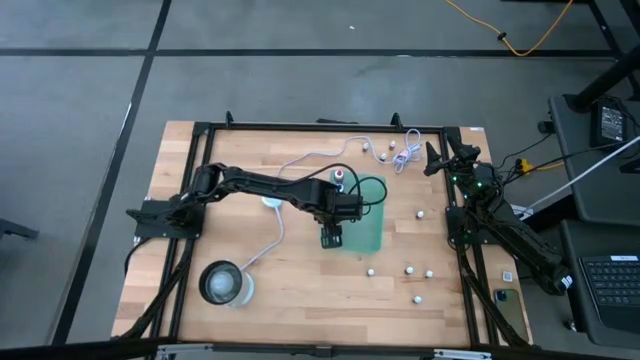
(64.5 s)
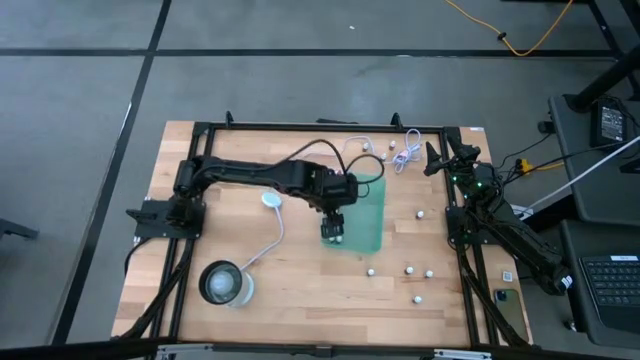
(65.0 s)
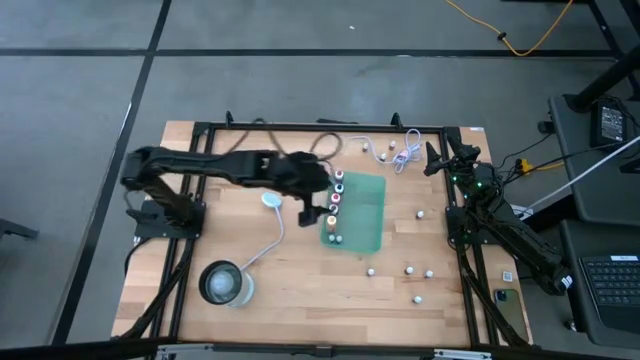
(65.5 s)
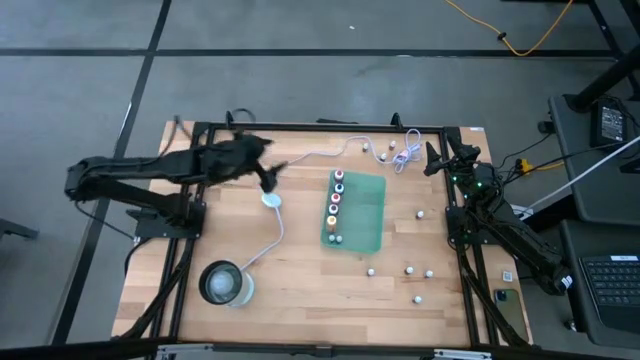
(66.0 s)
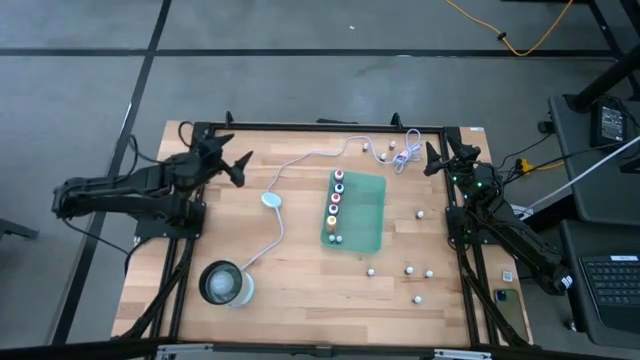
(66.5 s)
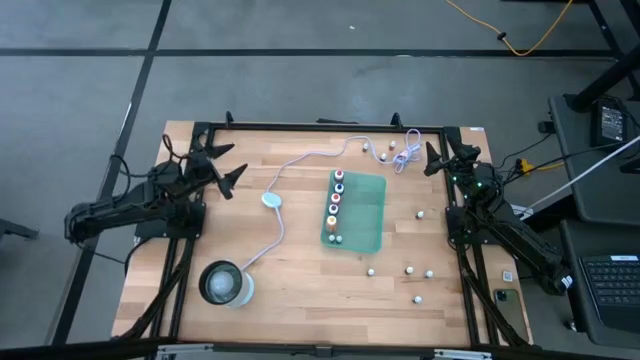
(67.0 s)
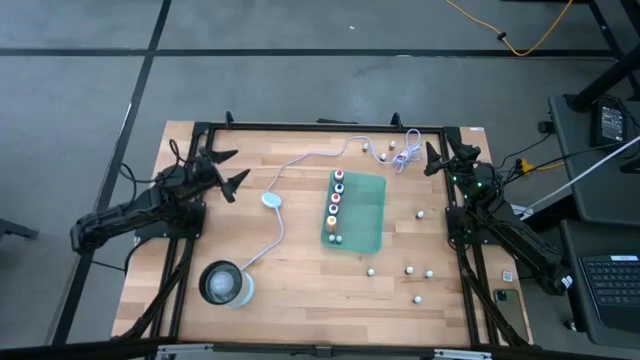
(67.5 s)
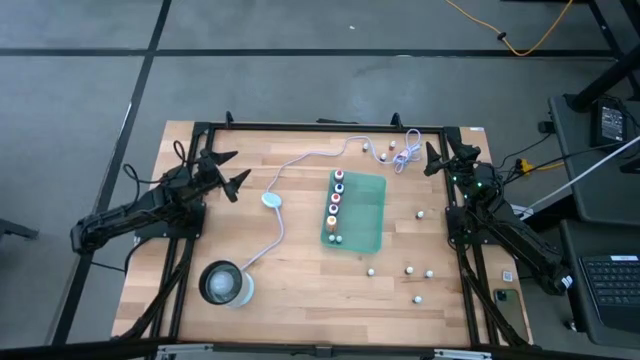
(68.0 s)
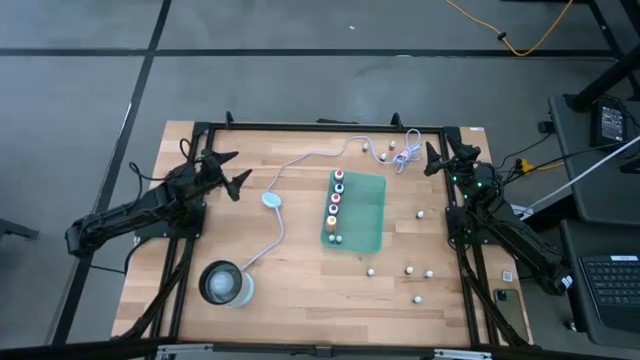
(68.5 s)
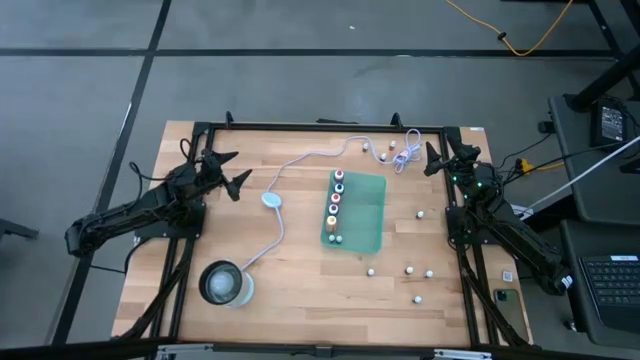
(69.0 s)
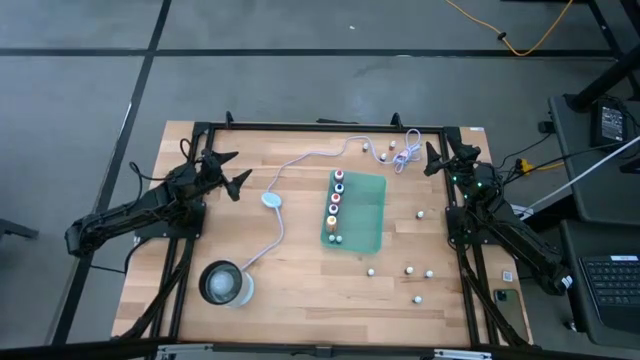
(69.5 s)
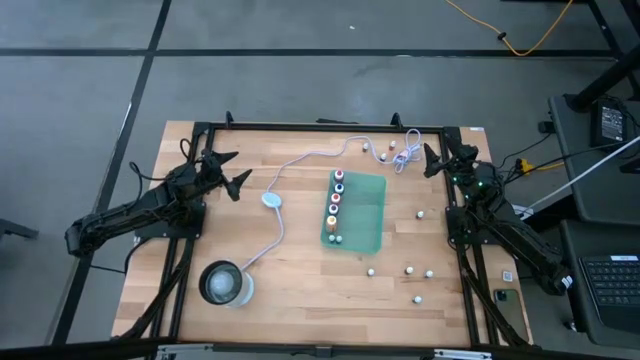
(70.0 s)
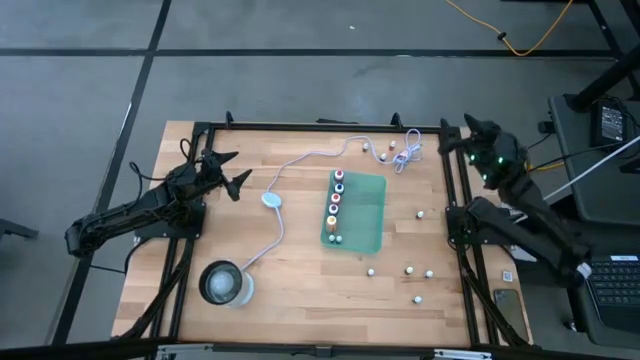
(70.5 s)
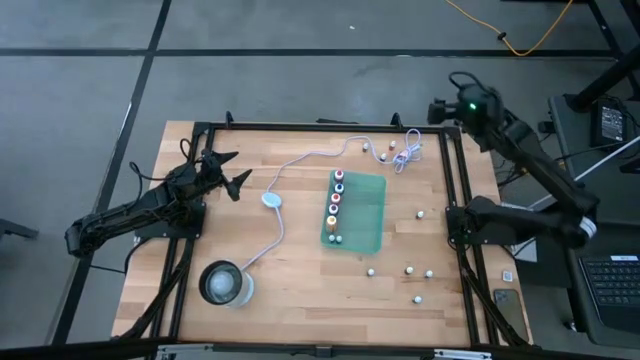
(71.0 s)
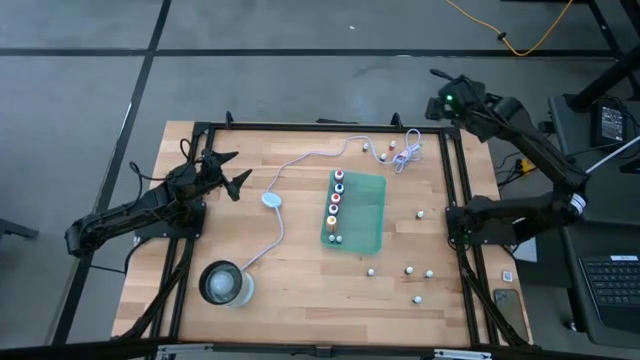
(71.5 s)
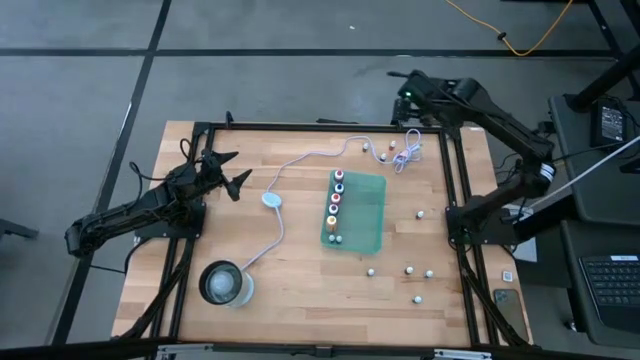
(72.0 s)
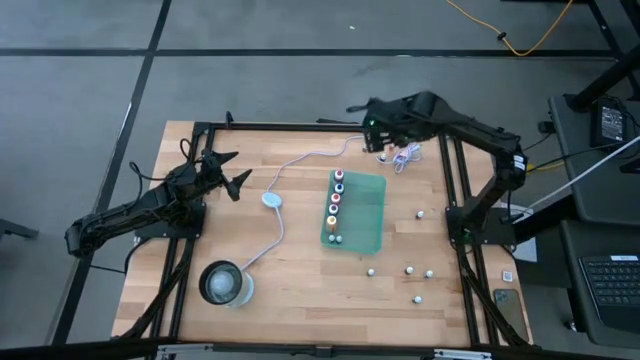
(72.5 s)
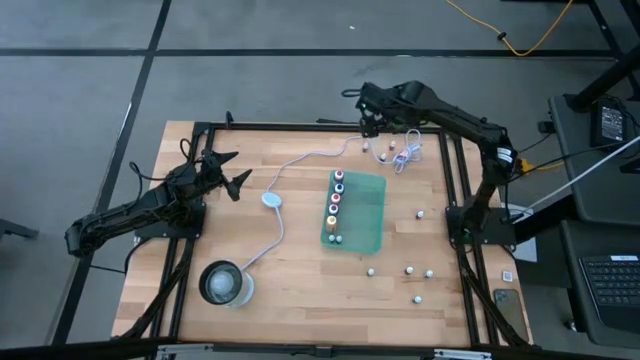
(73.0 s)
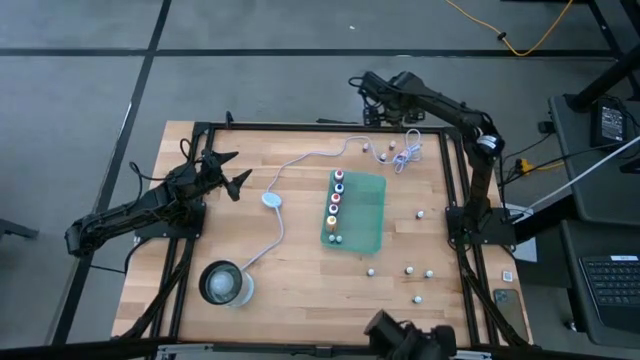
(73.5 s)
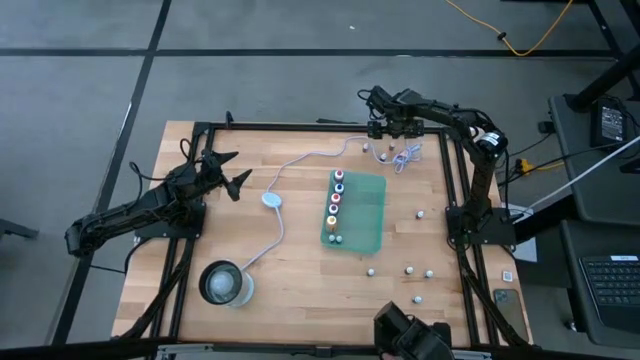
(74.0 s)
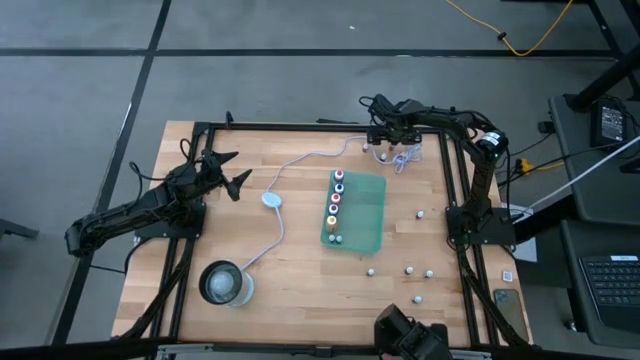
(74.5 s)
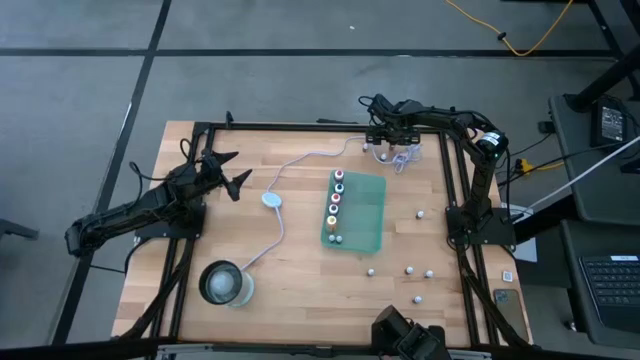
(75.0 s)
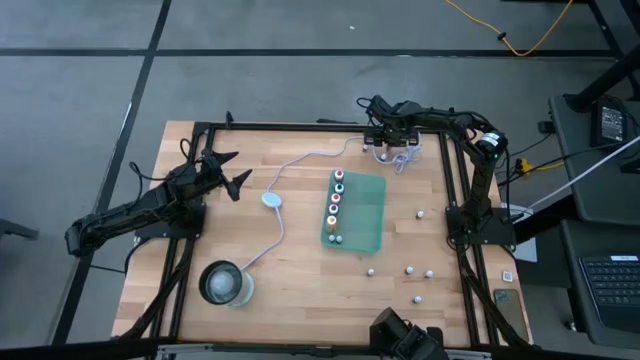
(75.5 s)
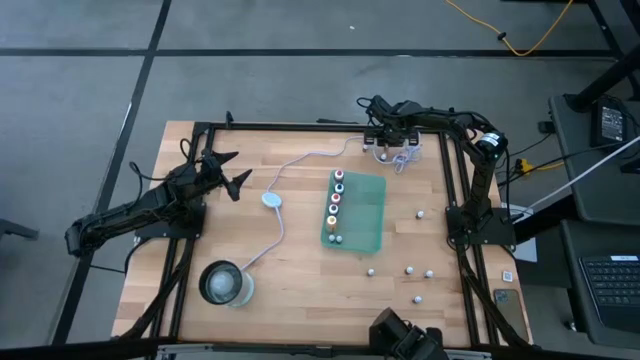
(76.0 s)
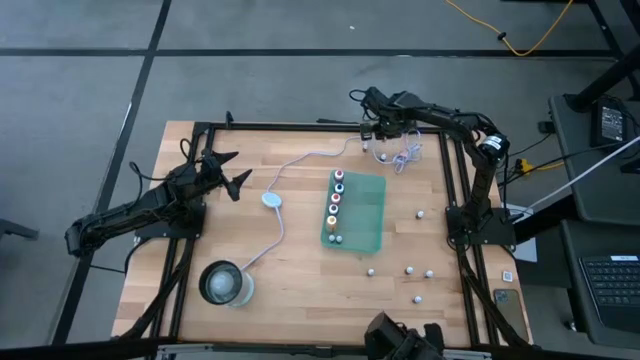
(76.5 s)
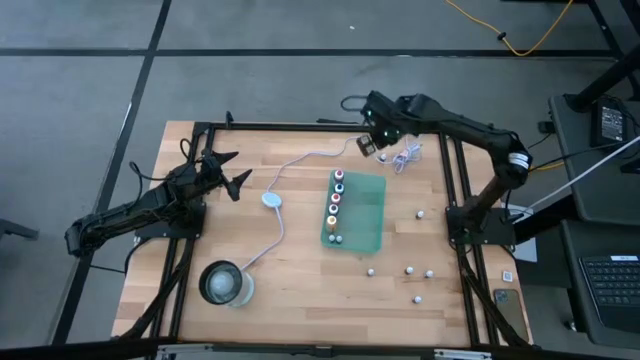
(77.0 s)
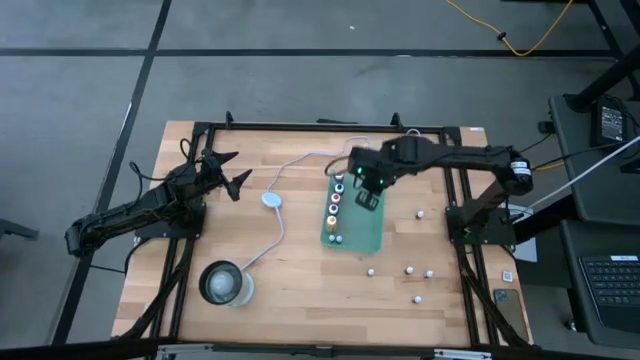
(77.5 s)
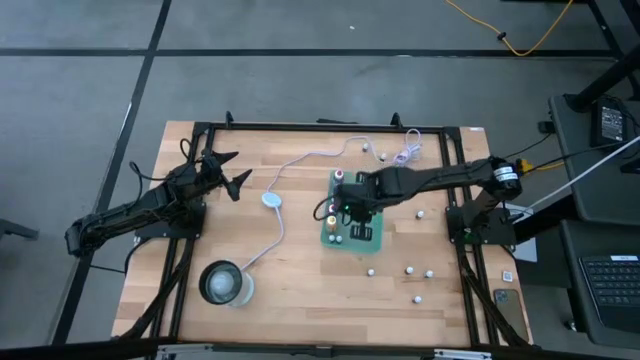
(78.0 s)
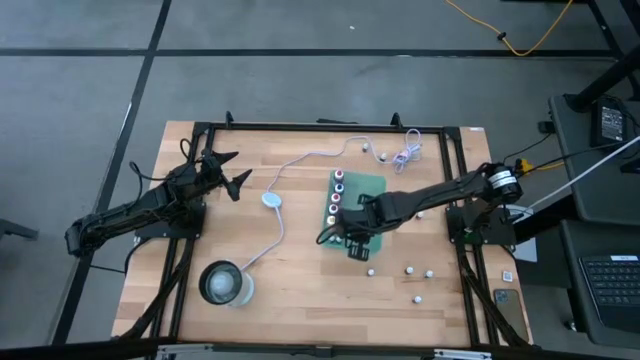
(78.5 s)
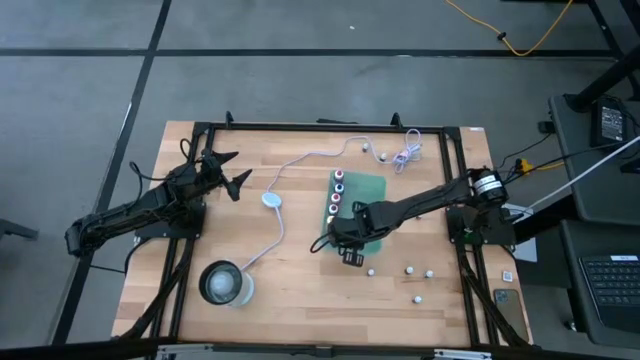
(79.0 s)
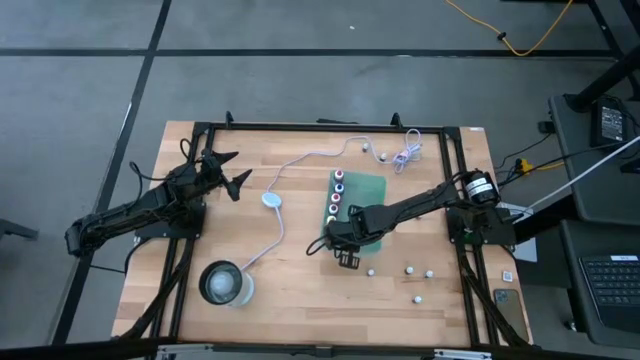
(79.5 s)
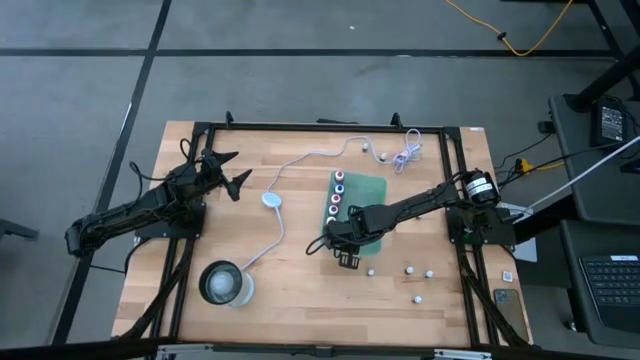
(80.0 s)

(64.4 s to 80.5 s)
Task: Pick & Place food coloring
Put the small red food coloring bottle into the green bin

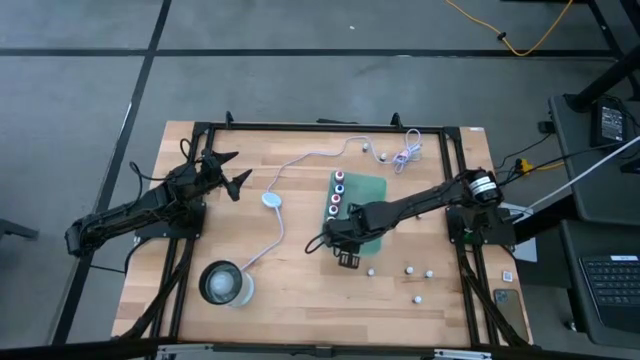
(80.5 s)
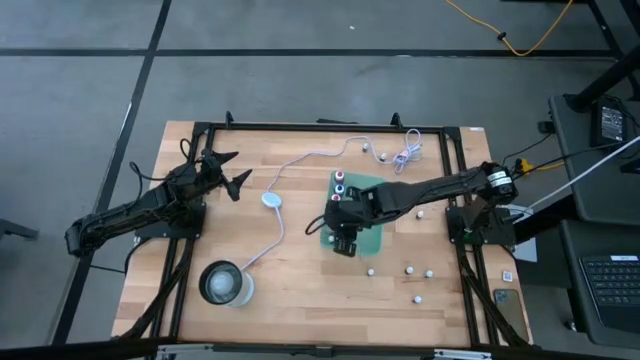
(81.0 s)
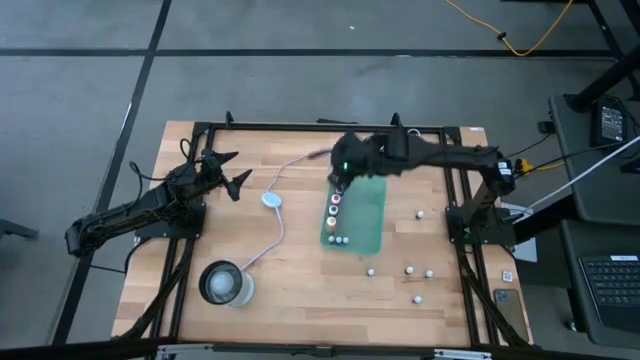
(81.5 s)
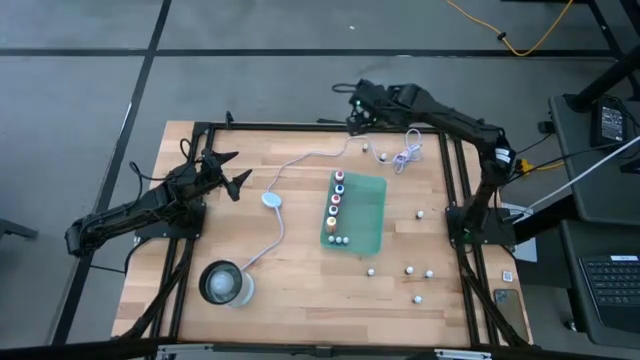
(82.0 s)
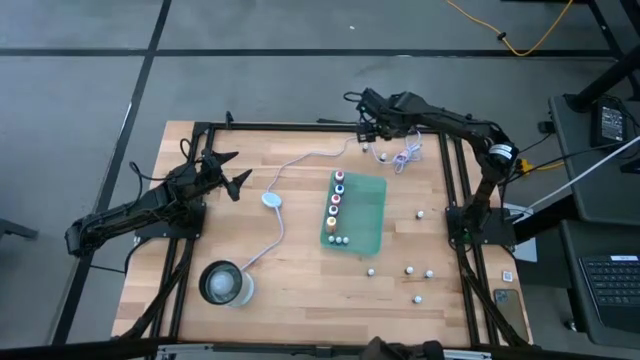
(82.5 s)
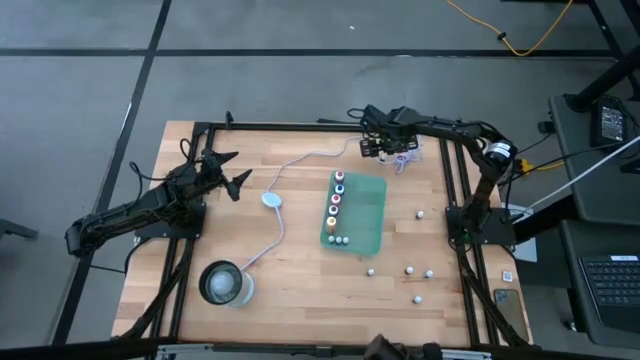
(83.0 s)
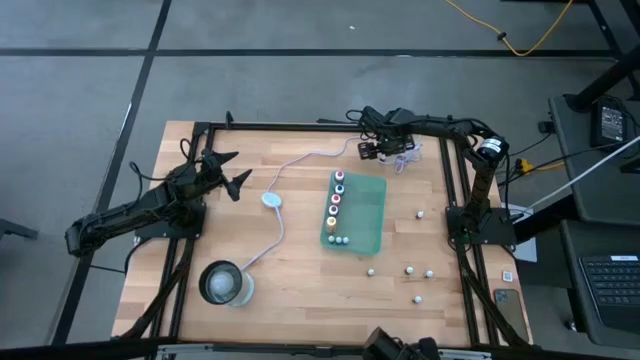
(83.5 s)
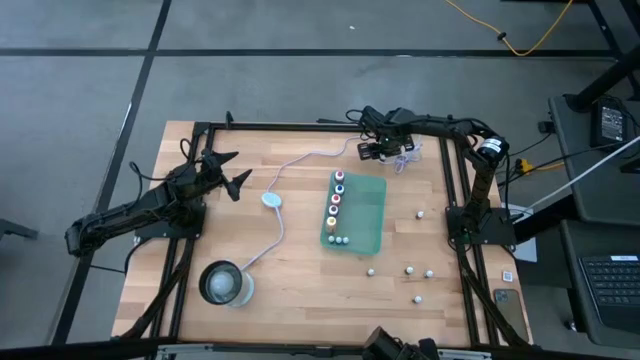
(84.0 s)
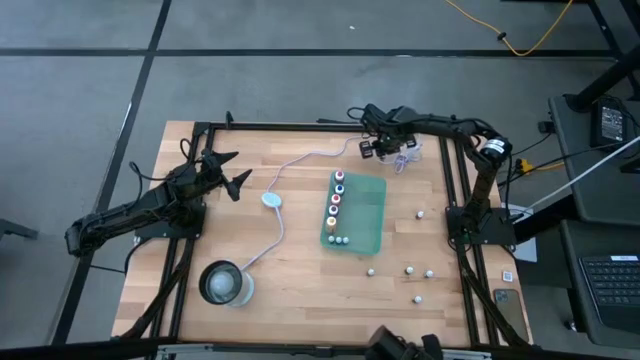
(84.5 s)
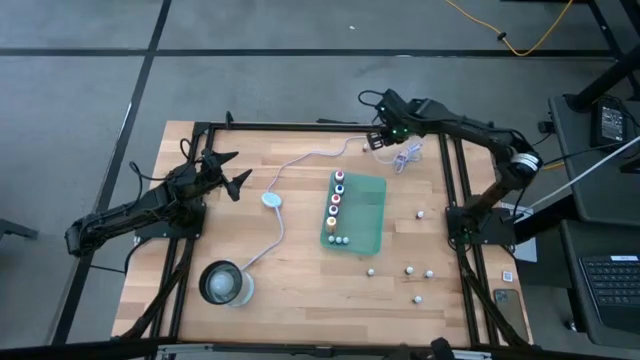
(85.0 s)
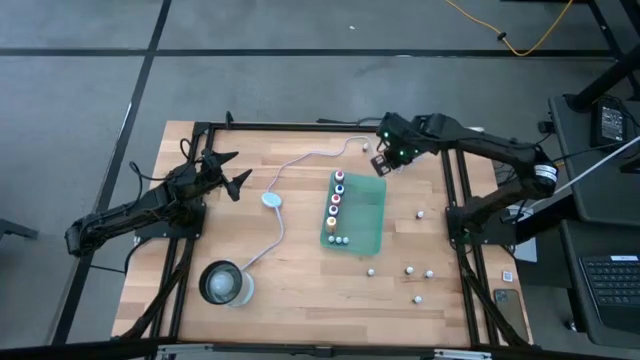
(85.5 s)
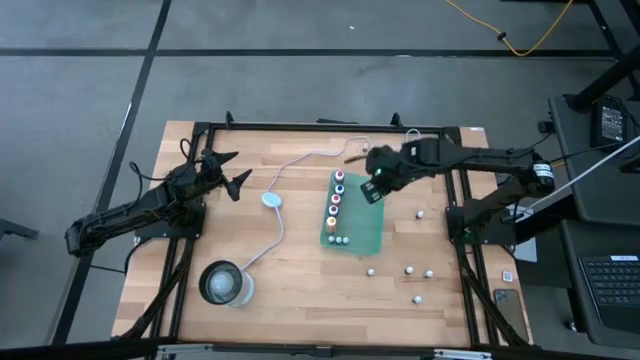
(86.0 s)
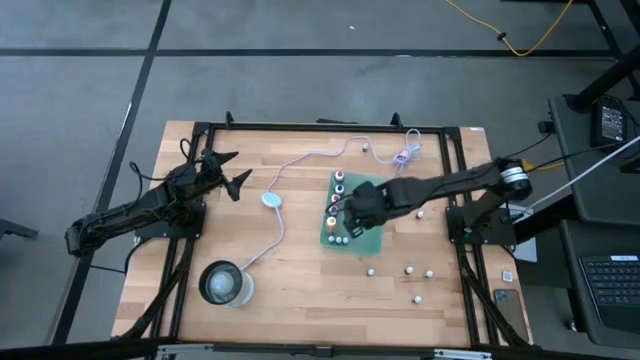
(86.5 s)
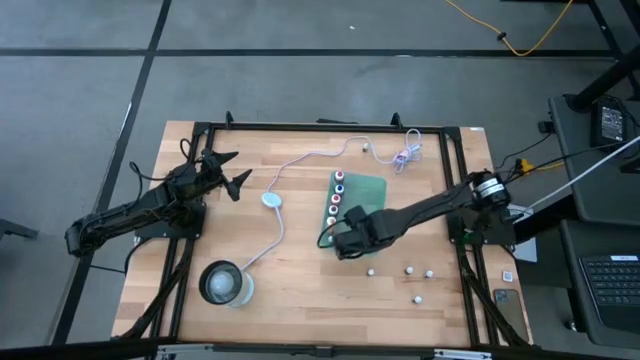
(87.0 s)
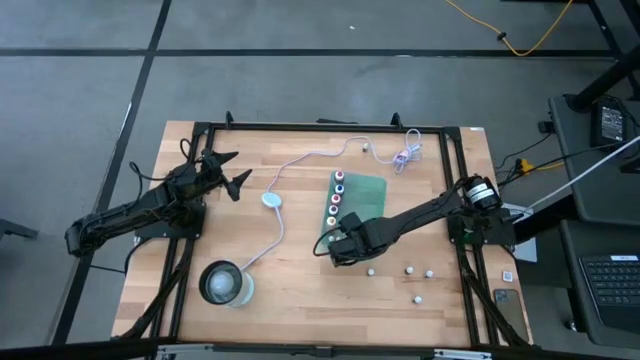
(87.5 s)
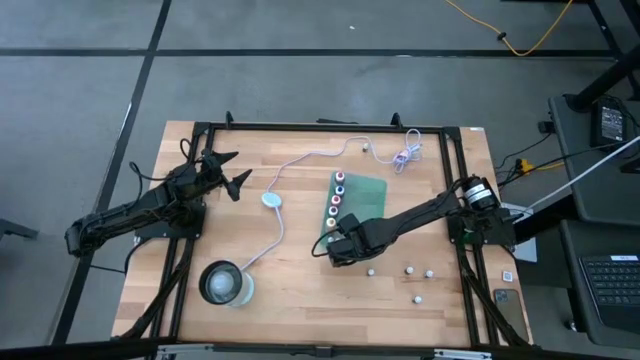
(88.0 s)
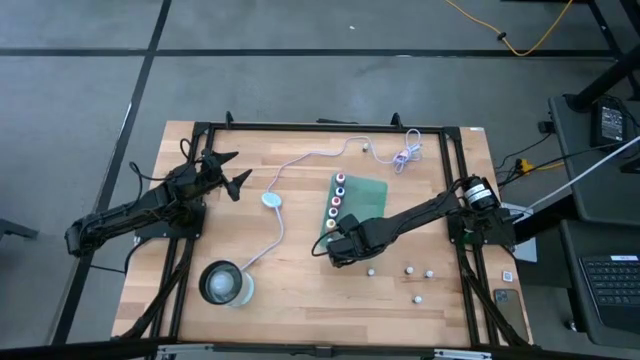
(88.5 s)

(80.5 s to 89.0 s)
Put the small black food coloring bottle into the green bin
